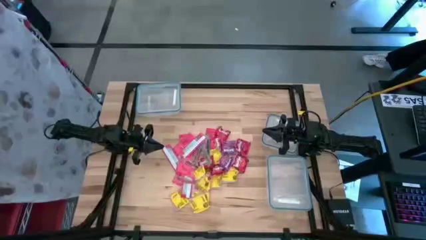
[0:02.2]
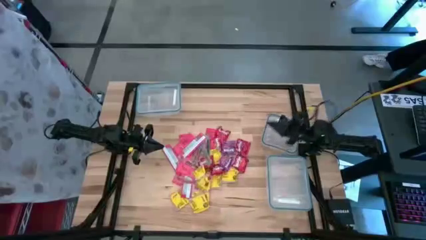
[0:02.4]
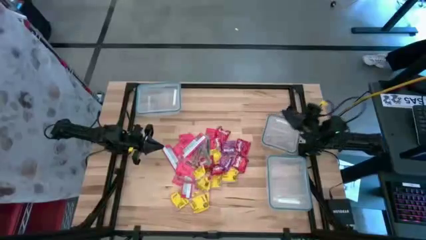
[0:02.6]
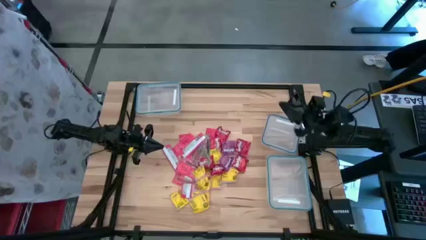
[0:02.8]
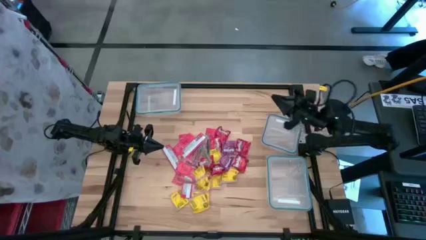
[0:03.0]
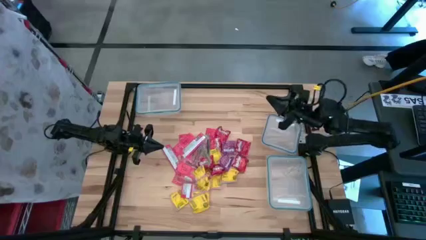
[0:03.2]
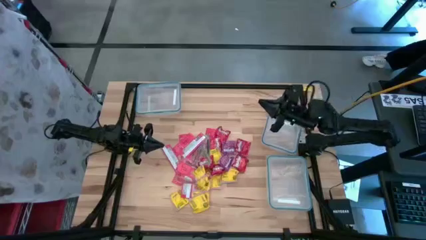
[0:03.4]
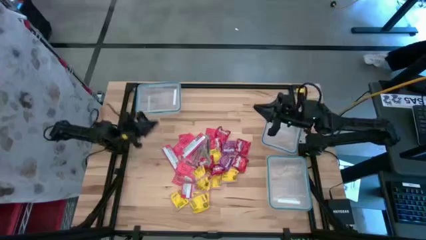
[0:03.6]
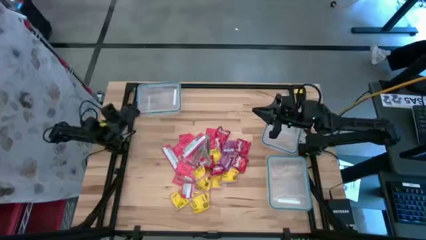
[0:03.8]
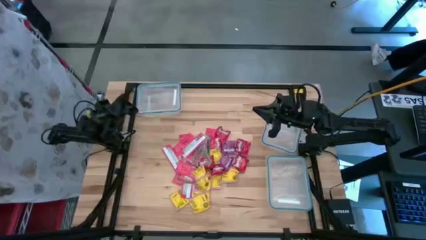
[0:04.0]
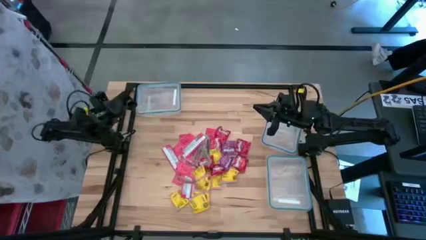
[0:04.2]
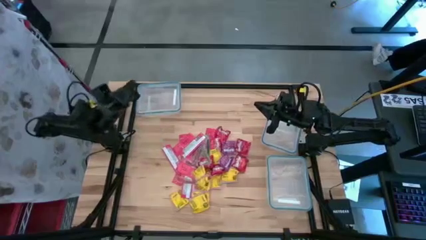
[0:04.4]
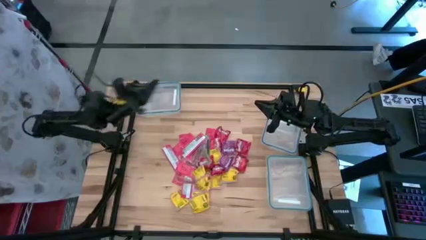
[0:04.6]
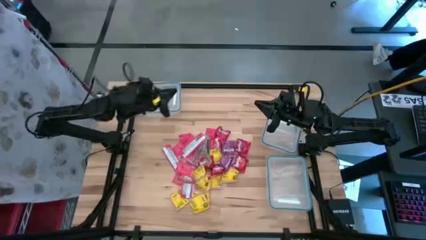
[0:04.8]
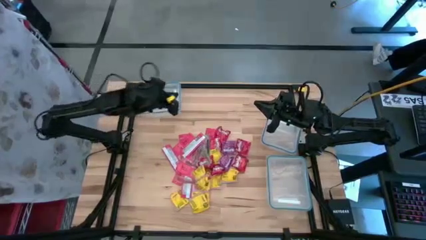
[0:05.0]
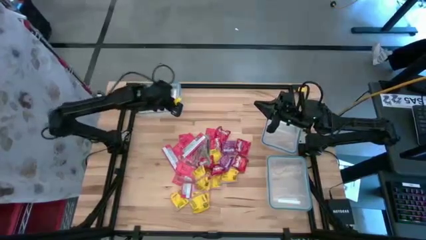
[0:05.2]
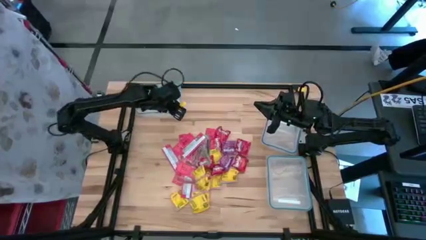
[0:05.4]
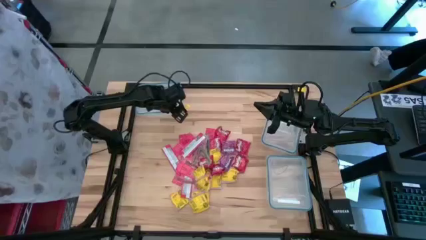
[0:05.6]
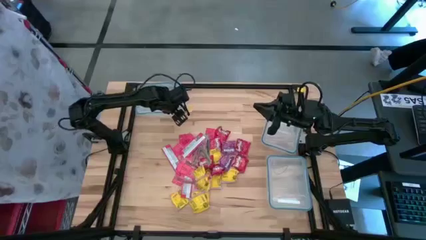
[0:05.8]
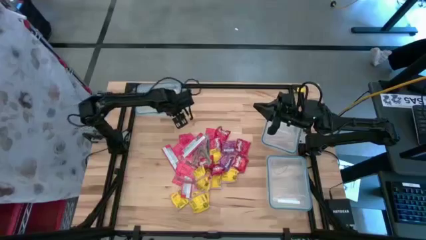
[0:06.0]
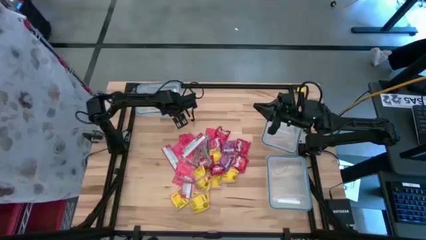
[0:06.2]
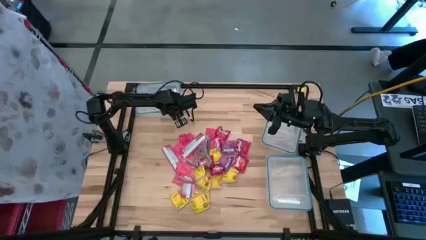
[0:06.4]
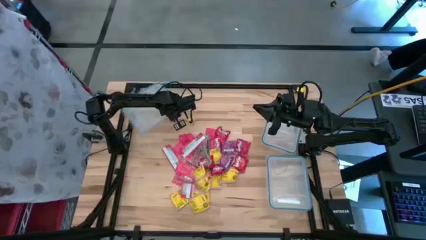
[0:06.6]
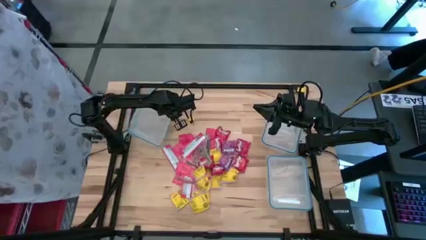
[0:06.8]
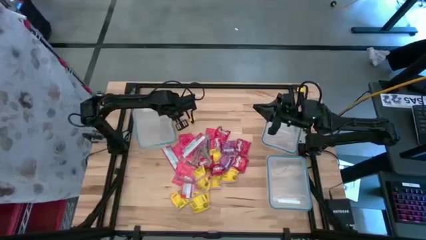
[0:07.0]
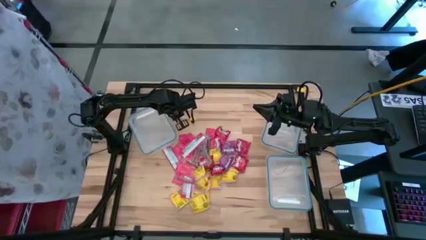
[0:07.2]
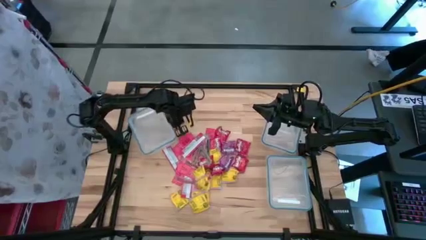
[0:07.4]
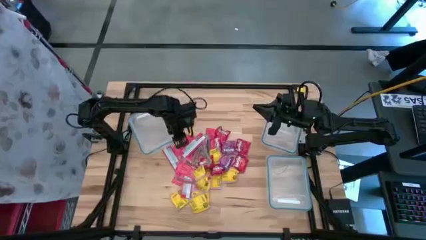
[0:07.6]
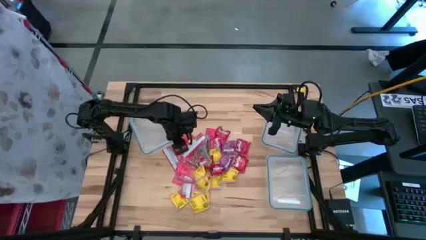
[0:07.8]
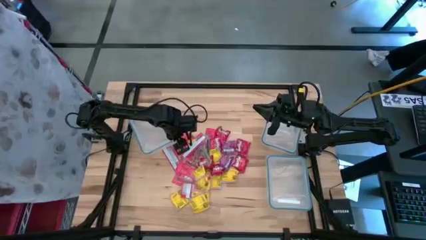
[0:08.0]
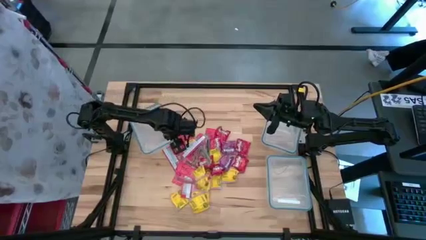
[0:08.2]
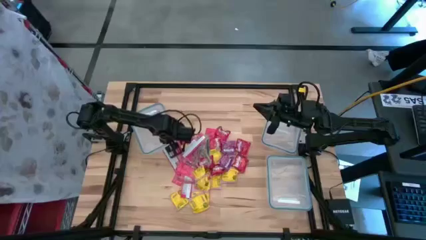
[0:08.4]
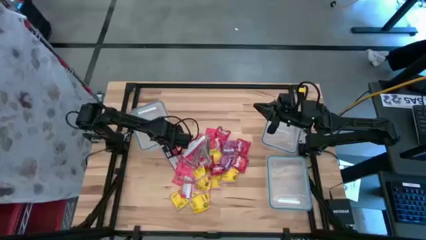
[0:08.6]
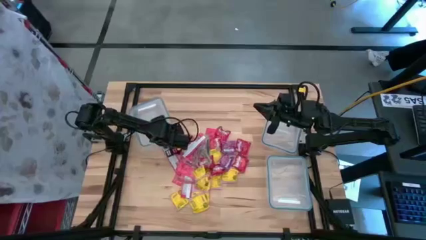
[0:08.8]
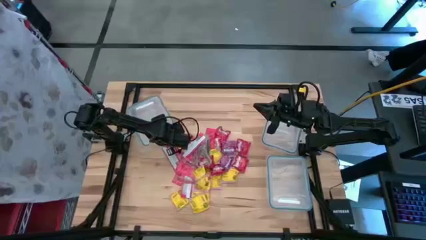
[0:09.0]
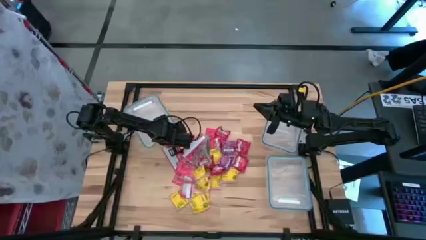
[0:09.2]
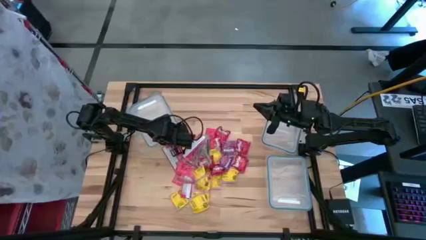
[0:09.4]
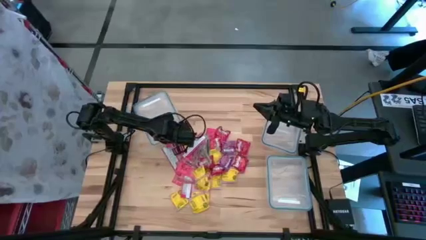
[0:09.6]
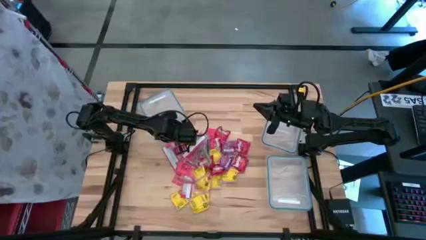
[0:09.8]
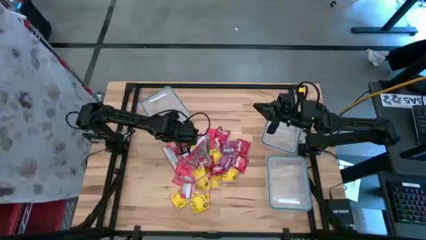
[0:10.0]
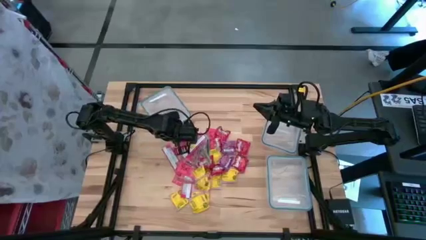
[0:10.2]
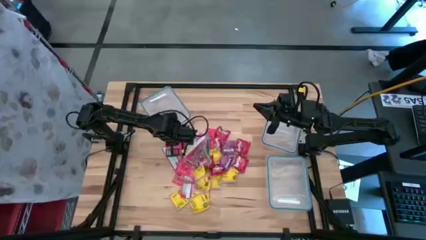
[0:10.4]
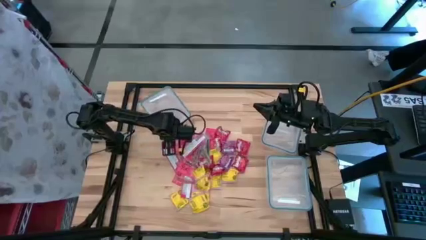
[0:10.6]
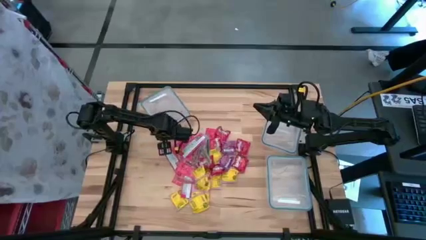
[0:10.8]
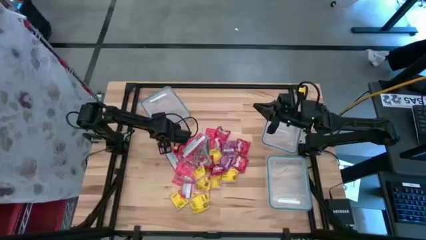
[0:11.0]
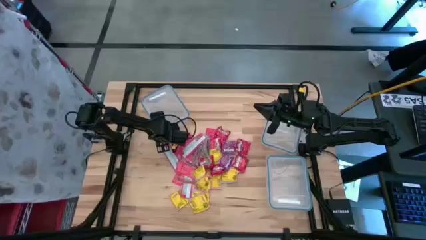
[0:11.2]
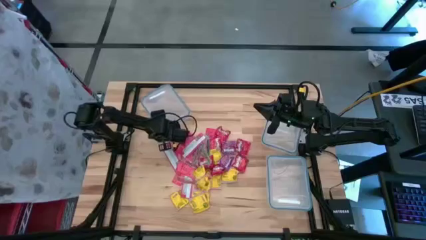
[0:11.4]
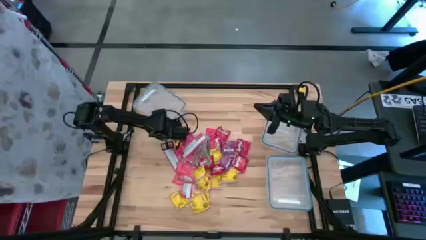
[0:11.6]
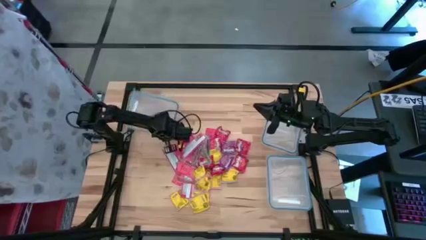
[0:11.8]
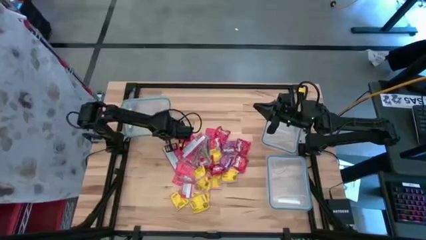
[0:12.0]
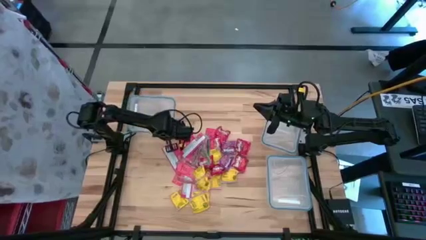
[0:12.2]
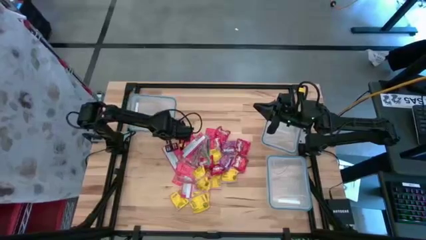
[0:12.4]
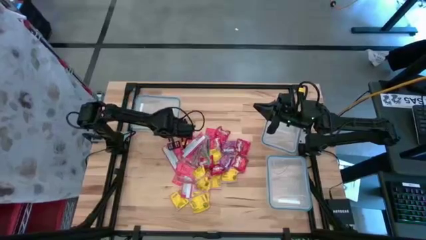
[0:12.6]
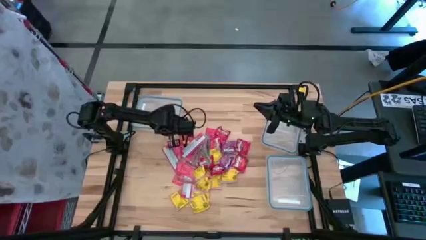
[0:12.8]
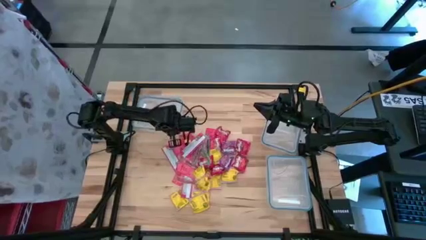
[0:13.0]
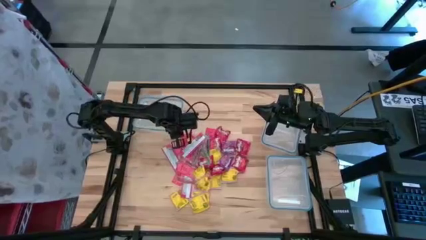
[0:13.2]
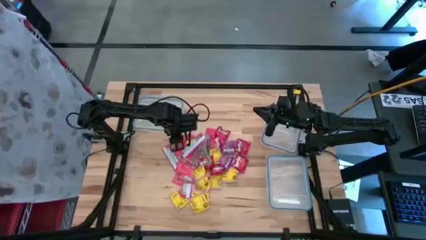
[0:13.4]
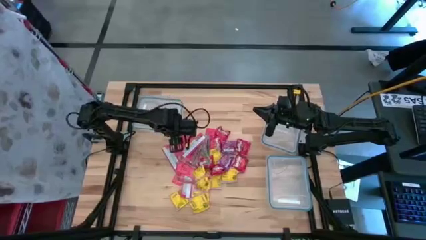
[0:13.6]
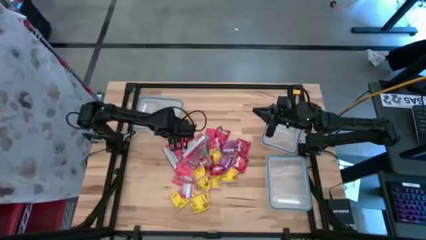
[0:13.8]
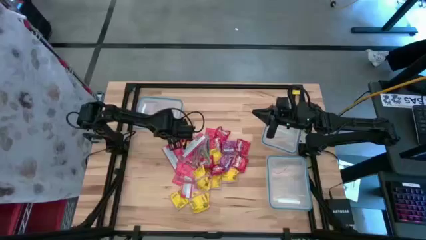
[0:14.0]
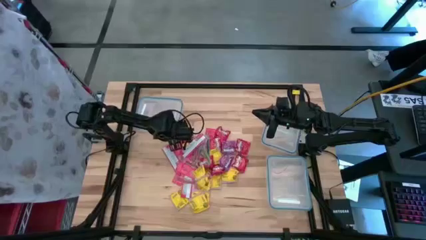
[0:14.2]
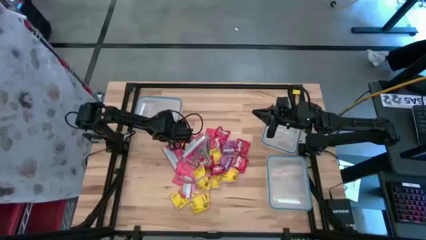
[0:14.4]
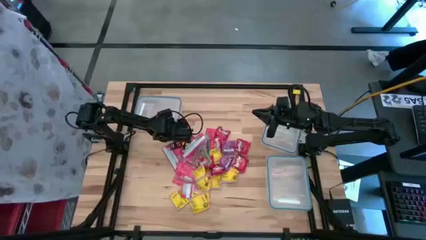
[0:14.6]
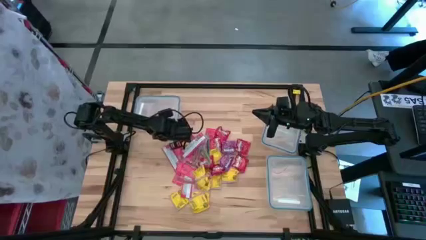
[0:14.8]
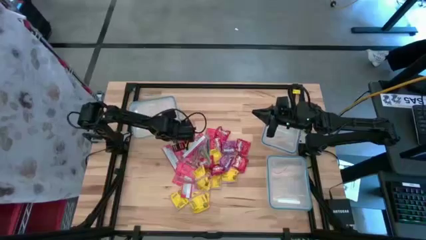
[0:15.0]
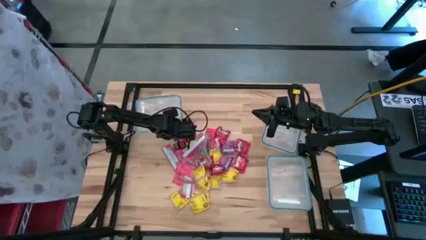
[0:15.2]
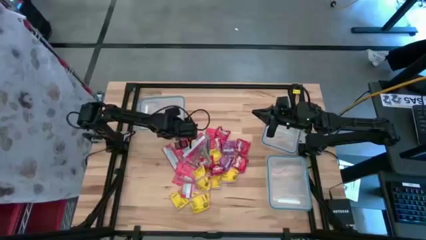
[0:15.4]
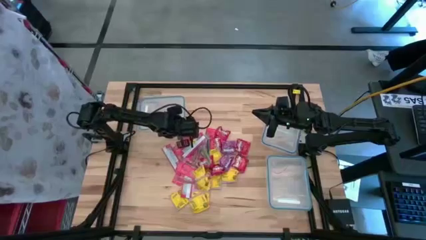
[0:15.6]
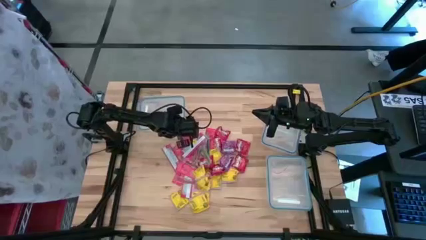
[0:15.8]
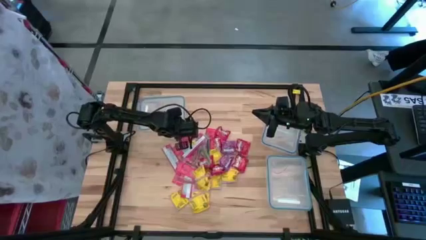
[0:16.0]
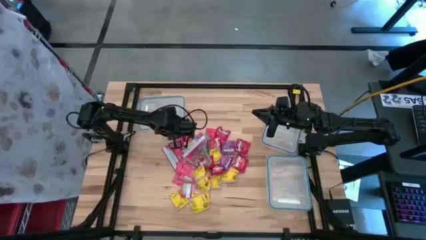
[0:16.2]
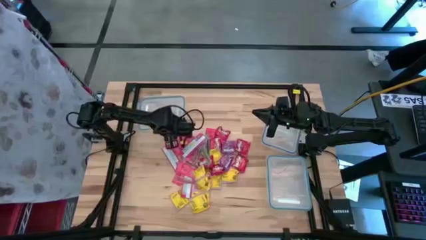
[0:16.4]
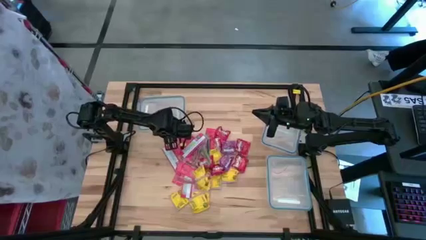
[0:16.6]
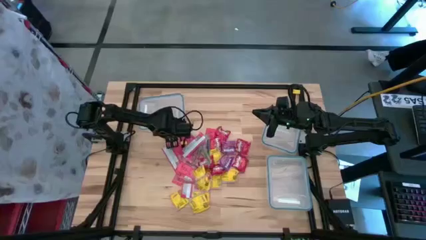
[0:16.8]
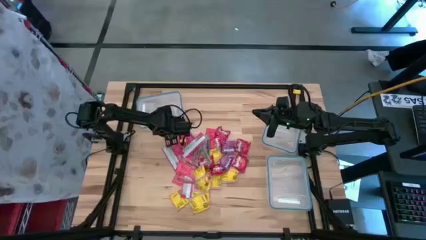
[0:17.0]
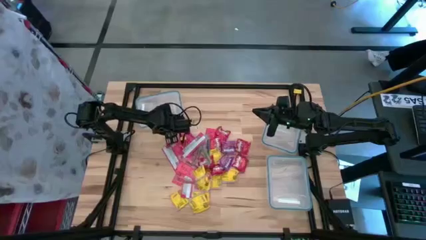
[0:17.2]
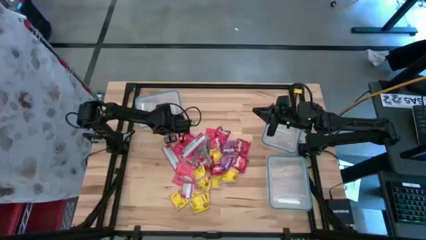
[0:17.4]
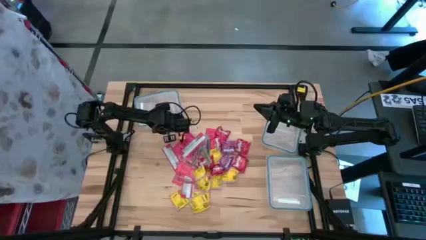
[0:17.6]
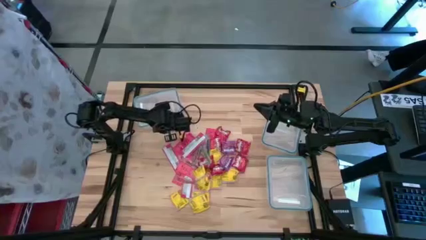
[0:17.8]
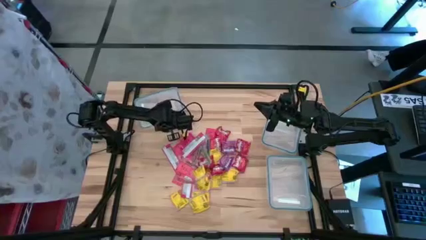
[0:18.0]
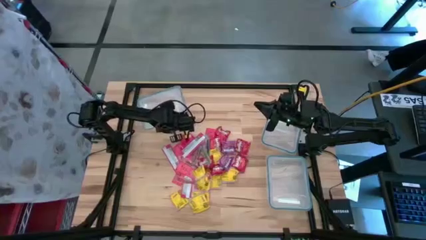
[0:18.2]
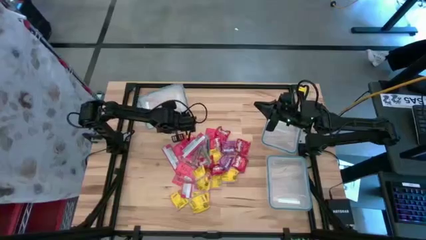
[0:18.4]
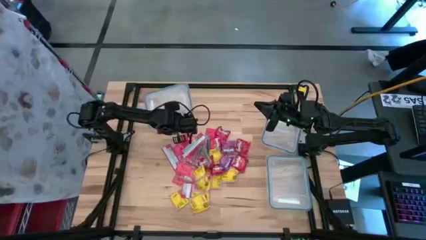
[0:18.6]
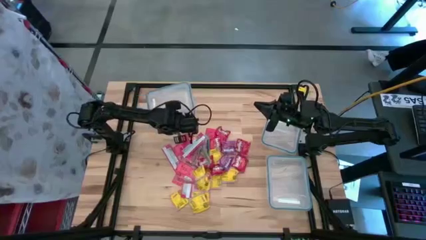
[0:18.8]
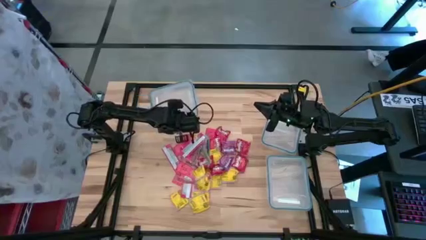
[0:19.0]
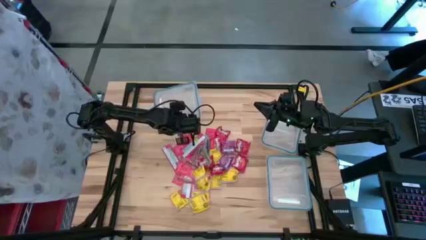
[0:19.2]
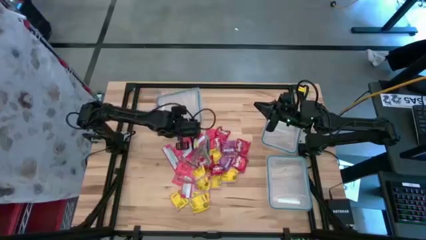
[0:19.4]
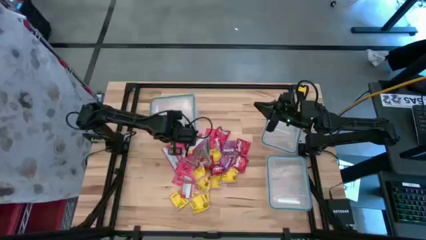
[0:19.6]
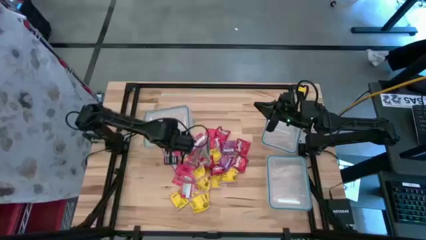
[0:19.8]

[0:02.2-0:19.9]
Task: Sort candy
Open the rectangular transparent bin
